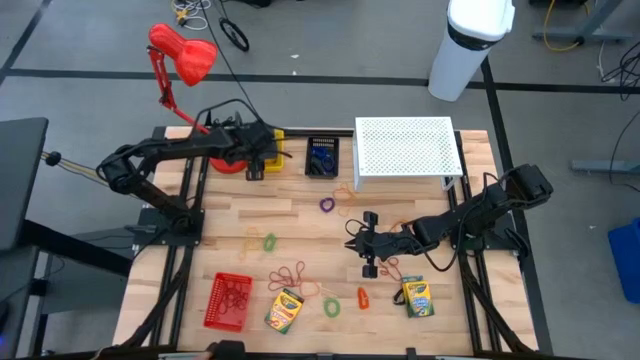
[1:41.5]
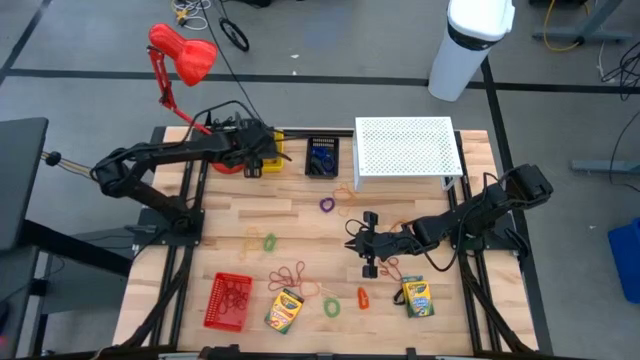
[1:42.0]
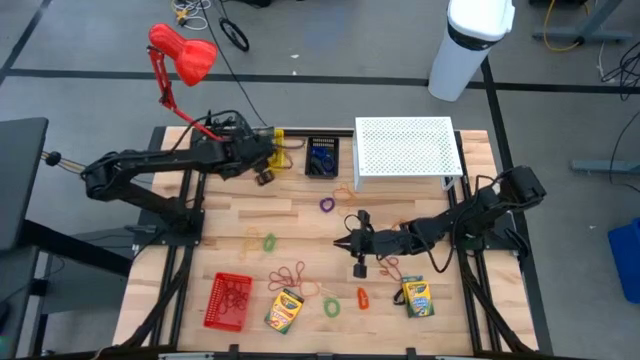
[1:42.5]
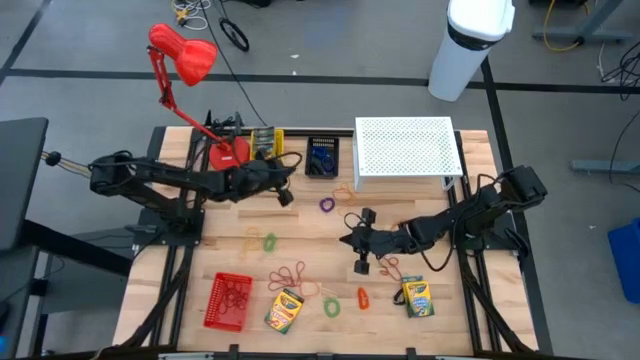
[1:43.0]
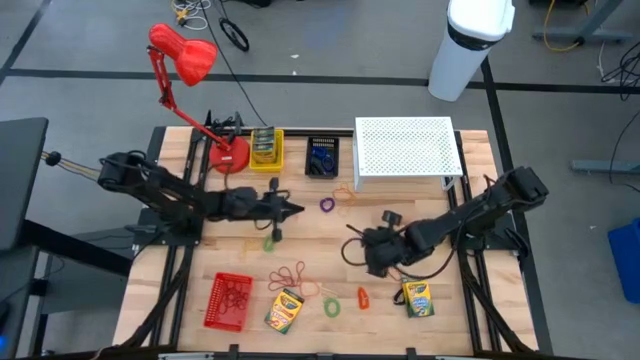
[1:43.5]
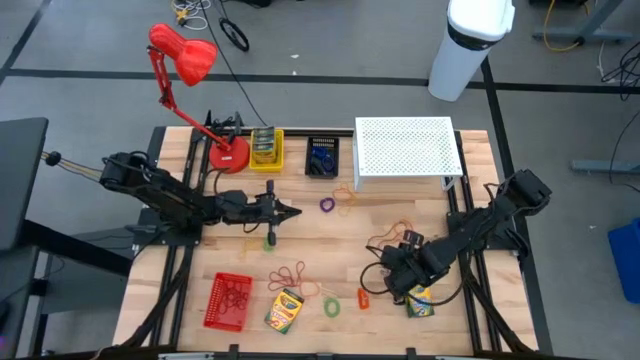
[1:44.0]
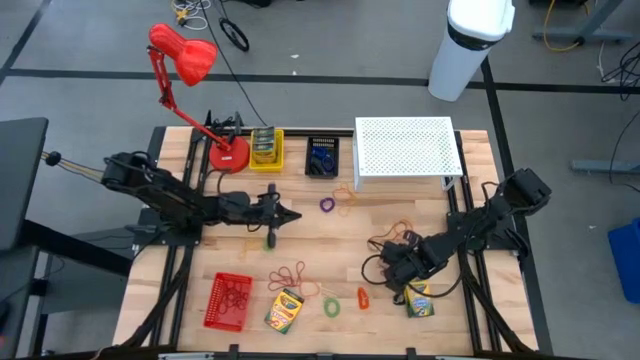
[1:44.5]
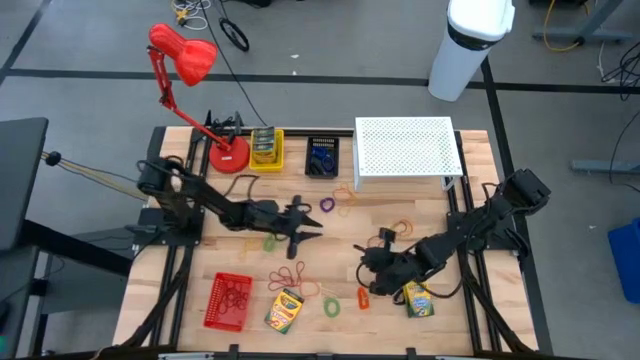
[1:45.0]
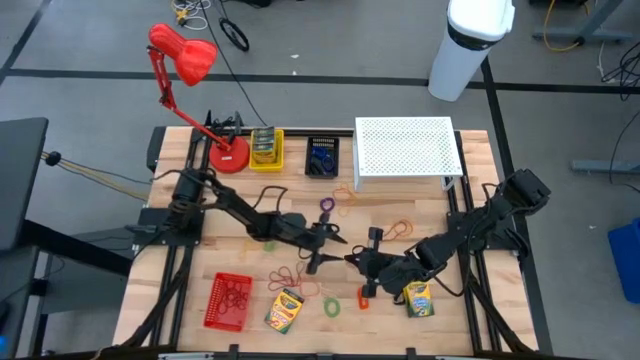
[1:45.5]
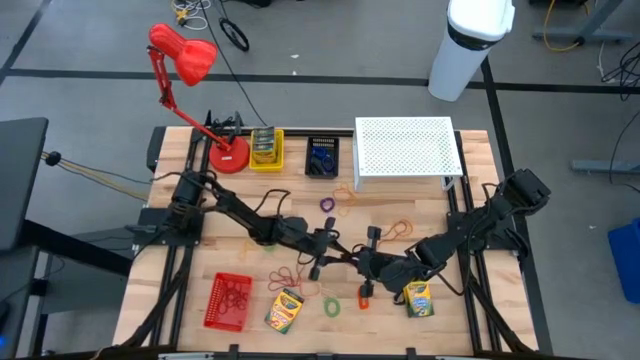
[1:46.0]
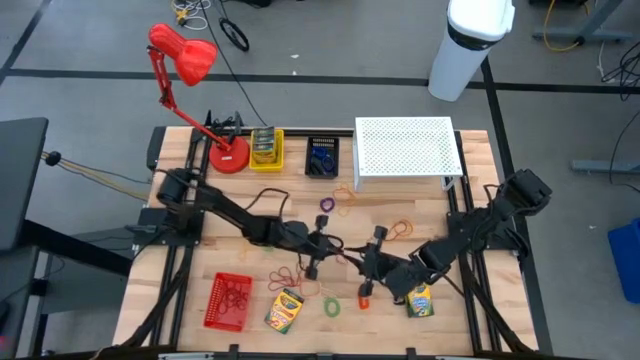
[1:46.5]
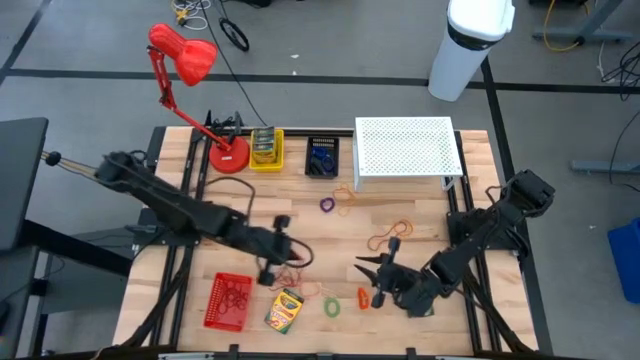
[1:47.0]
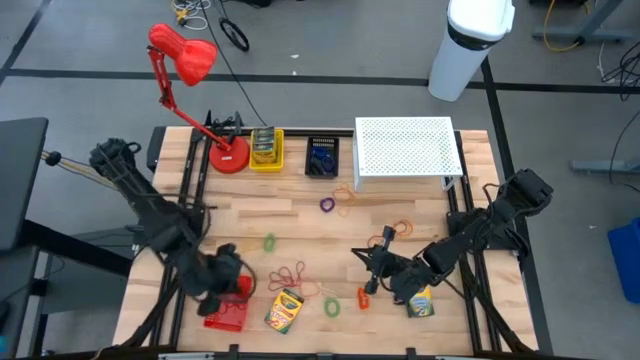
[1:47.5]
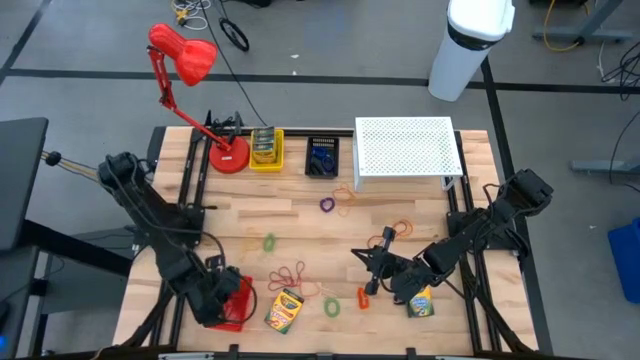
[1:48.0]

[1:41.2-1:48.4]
Task: Pick & Place Office Desk Supplies
Put the red rubber band into the red bin

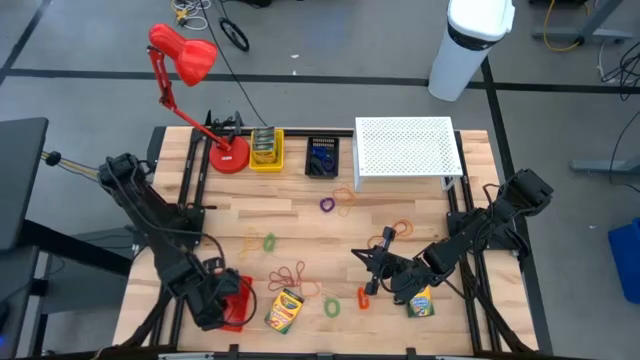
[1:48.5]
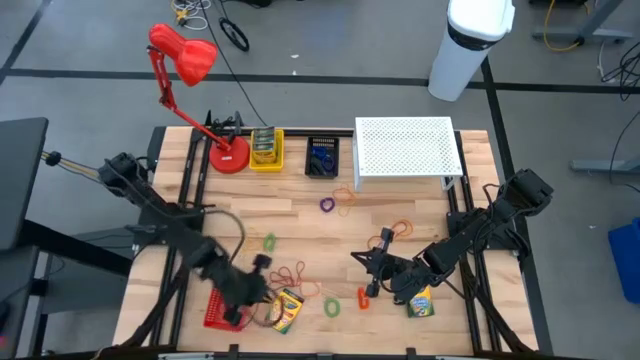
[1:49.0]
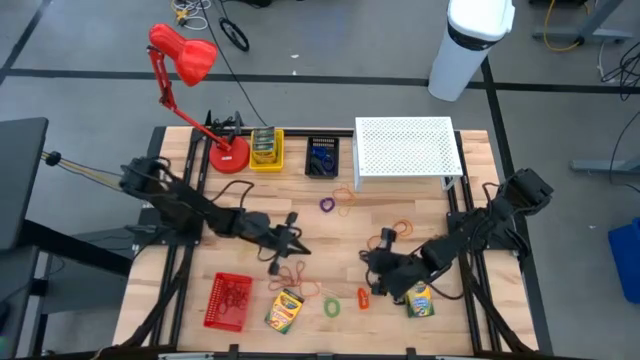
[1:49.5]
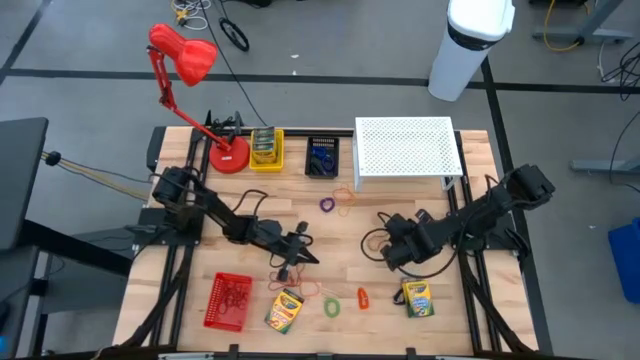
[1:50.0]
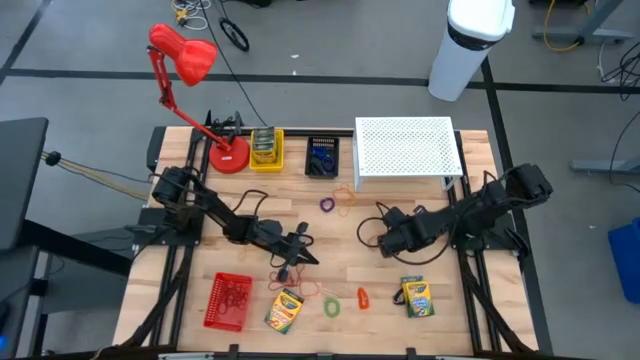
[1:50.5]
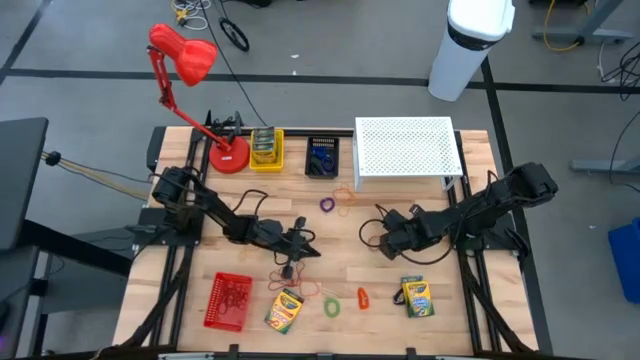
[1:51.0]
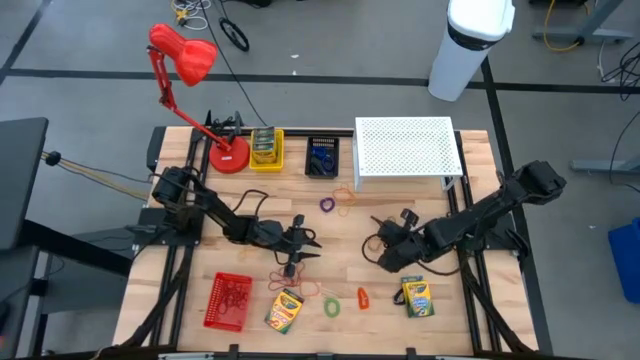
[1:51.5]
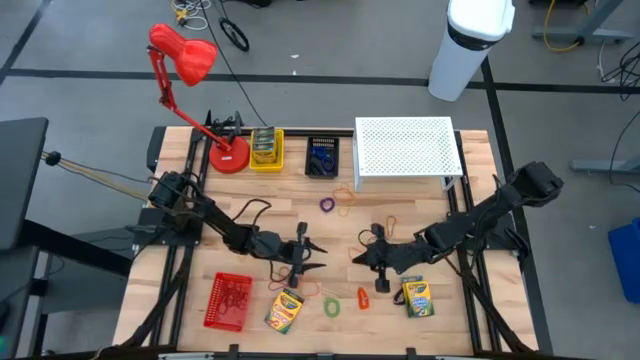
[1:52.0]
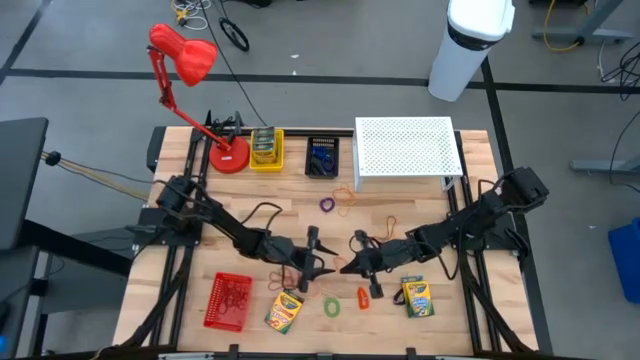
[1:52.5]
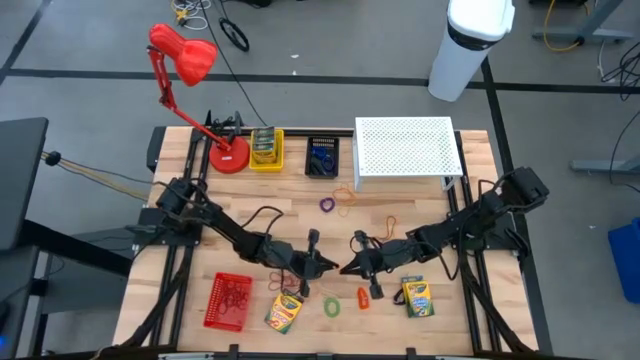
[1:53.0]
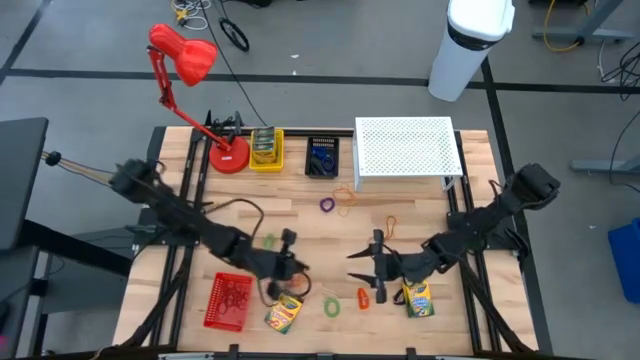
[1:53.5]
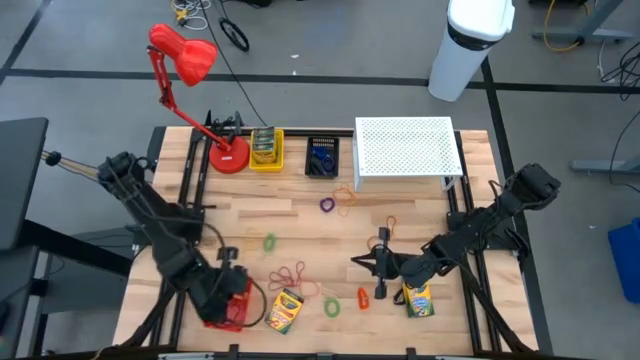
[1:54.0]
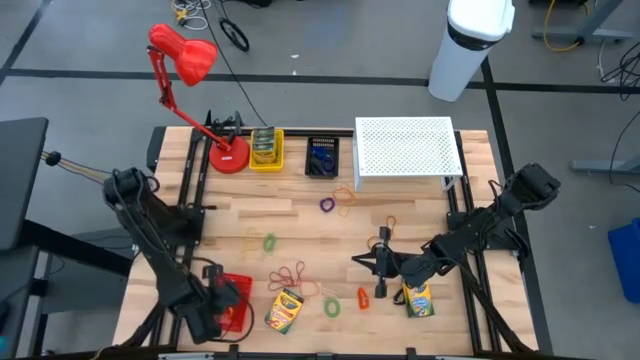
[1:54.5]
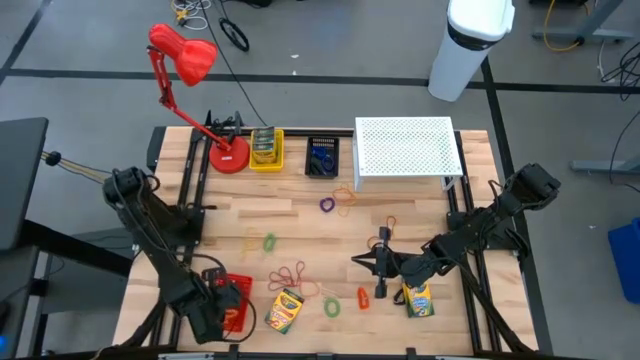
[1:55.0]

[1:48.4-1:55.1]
Put the orange rubber band into the red bin

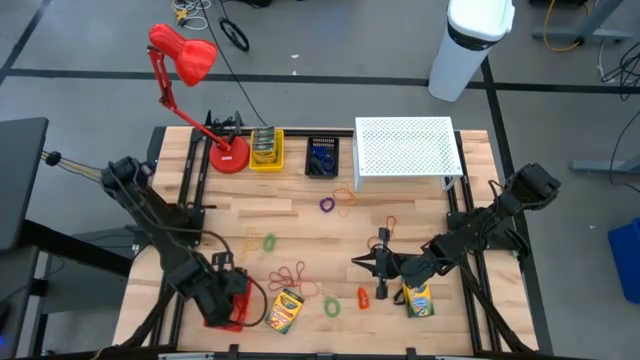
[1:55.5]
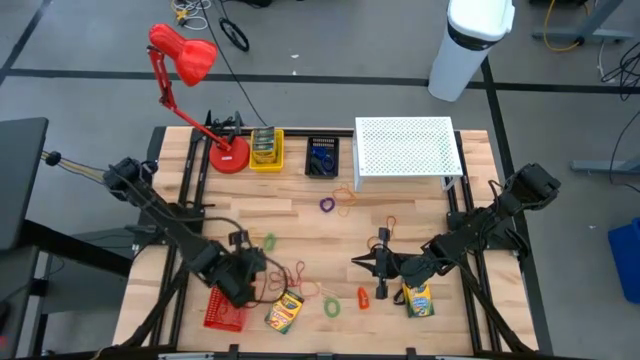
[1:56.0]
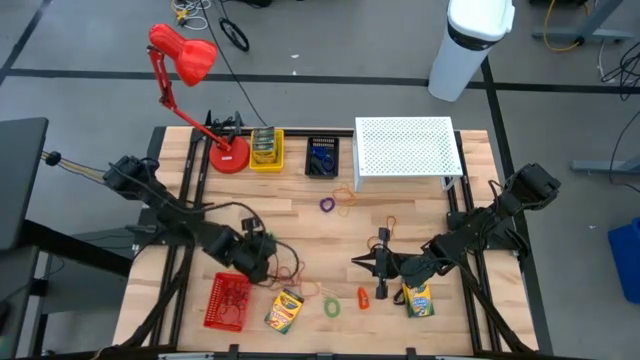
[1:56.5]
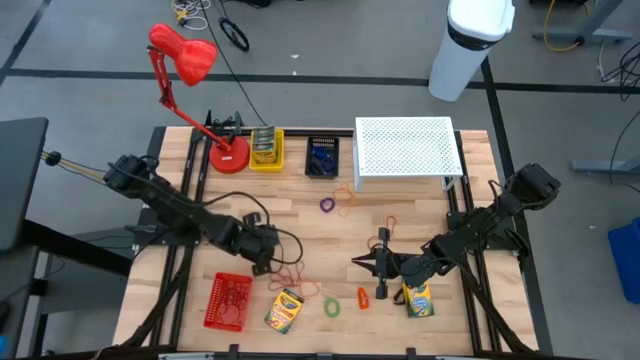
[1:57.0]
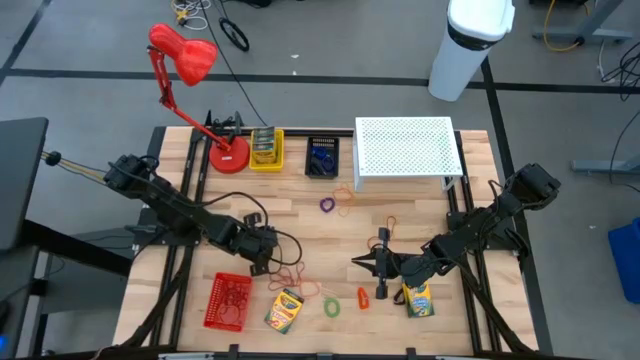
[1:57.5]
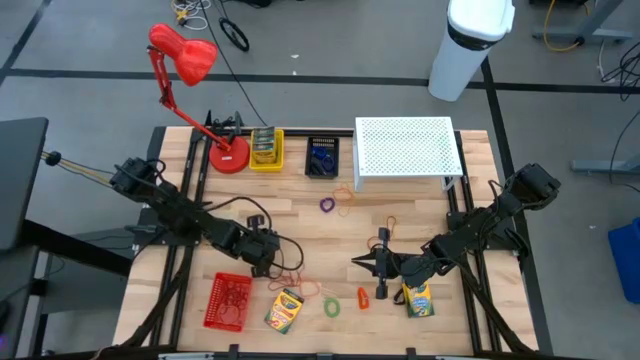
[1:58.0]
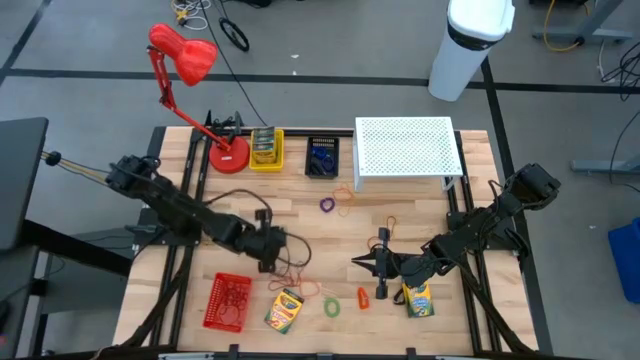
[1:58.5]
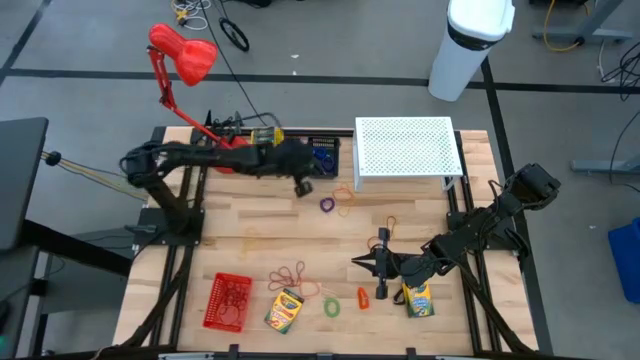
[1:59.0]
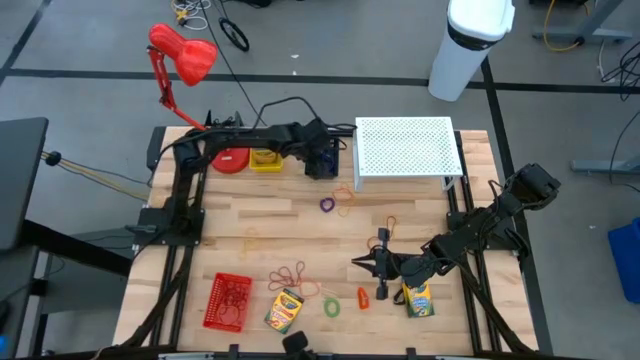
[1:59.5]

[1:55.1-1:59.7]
Put the green spring rubber band into the black bin
